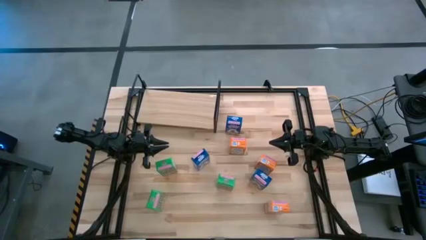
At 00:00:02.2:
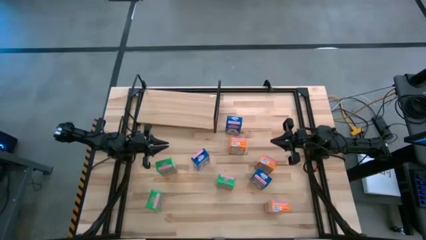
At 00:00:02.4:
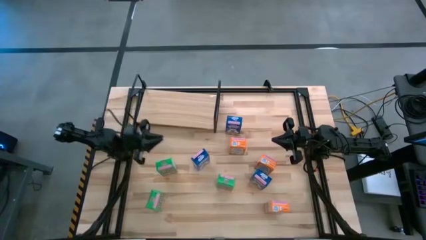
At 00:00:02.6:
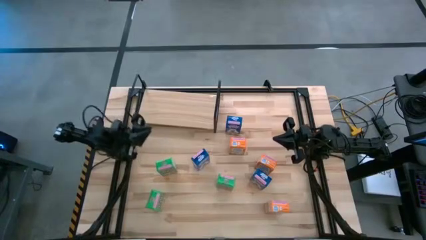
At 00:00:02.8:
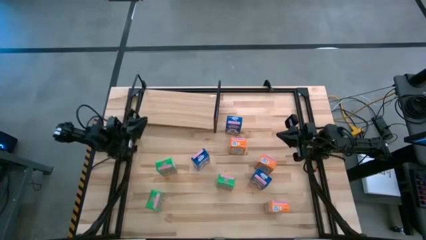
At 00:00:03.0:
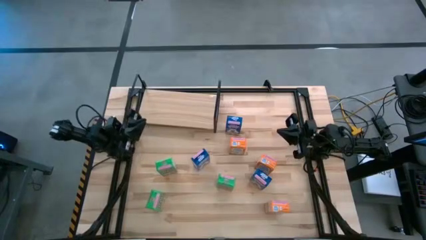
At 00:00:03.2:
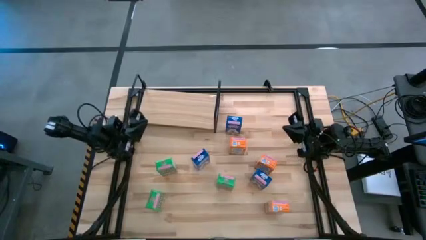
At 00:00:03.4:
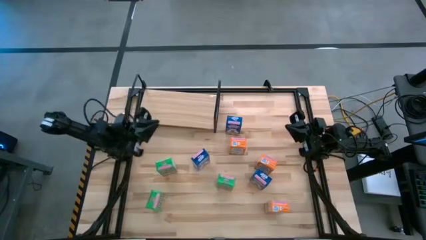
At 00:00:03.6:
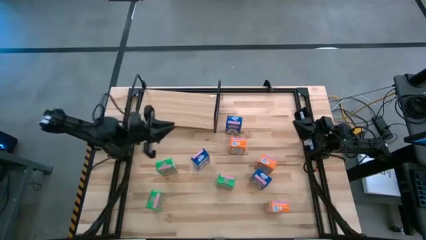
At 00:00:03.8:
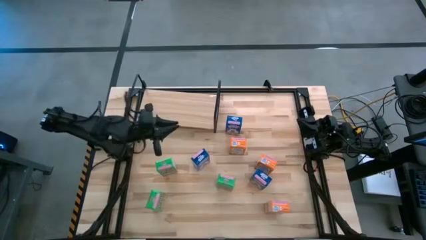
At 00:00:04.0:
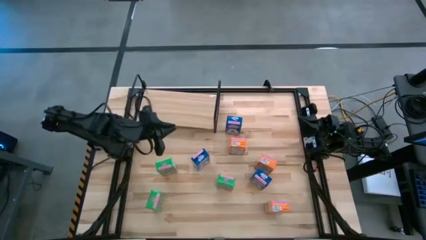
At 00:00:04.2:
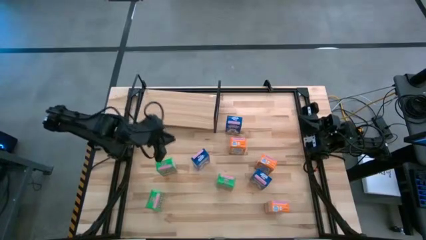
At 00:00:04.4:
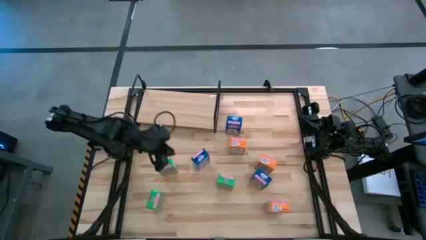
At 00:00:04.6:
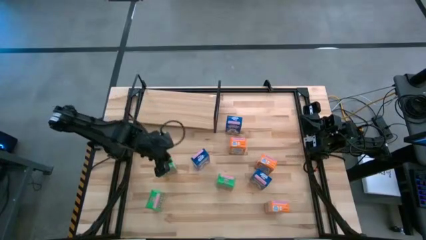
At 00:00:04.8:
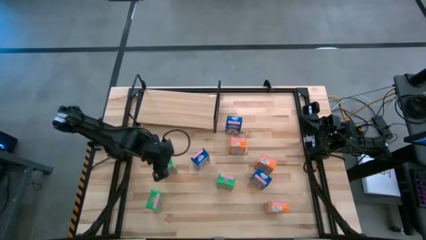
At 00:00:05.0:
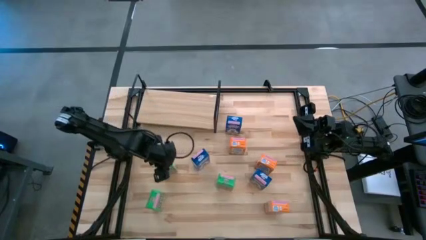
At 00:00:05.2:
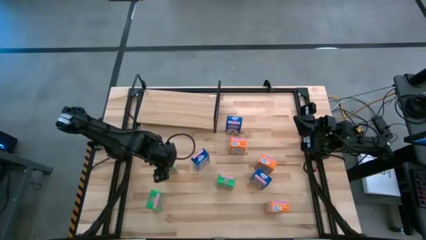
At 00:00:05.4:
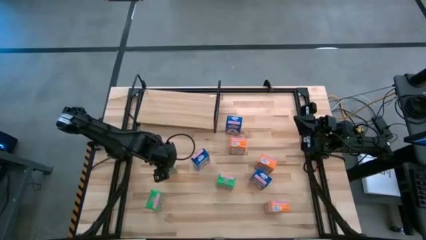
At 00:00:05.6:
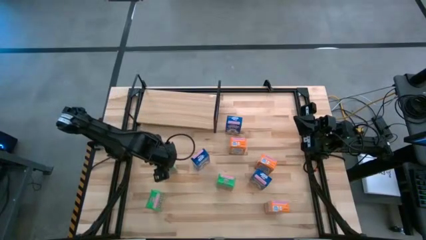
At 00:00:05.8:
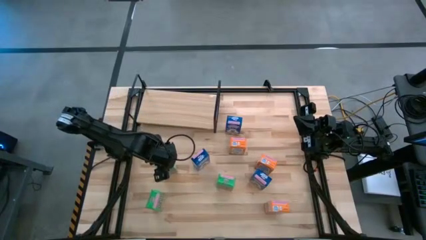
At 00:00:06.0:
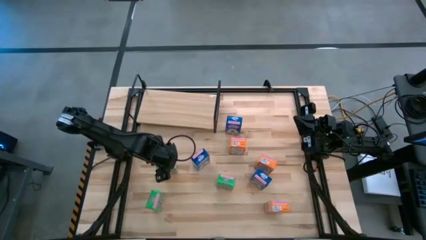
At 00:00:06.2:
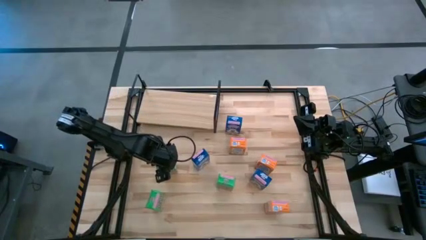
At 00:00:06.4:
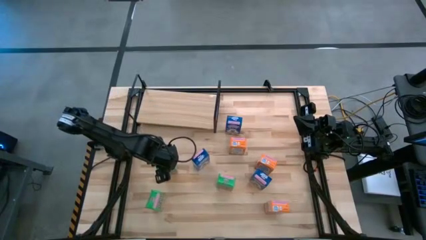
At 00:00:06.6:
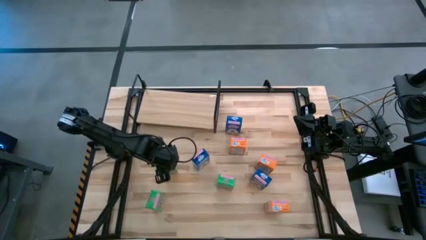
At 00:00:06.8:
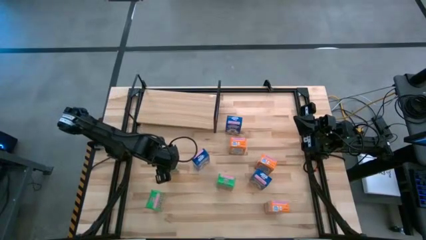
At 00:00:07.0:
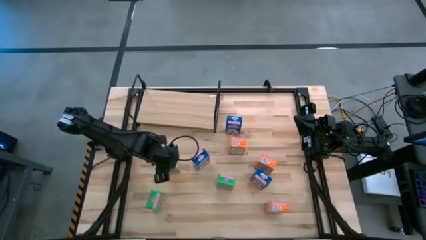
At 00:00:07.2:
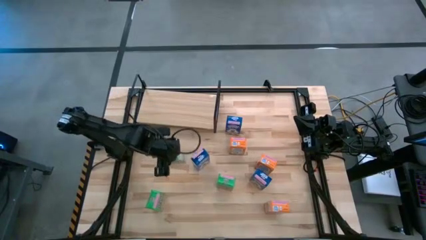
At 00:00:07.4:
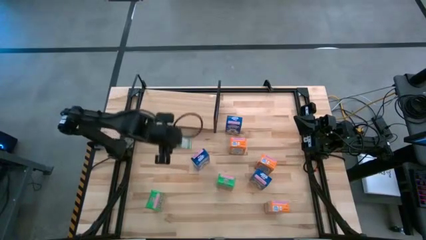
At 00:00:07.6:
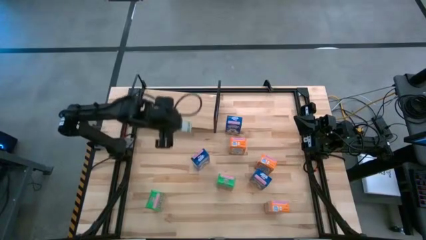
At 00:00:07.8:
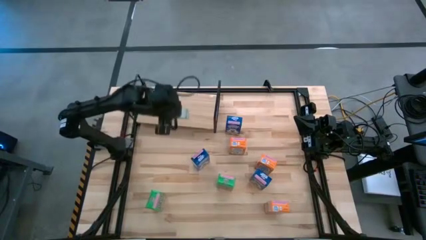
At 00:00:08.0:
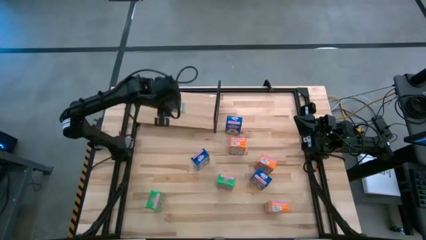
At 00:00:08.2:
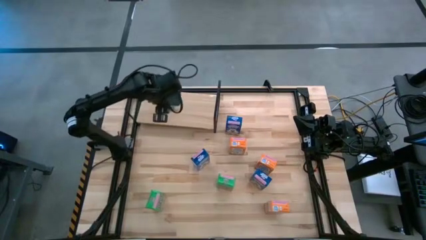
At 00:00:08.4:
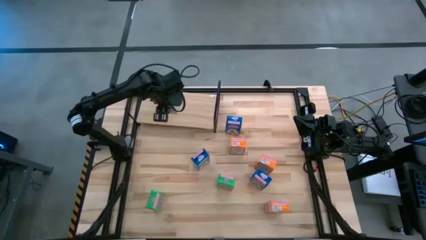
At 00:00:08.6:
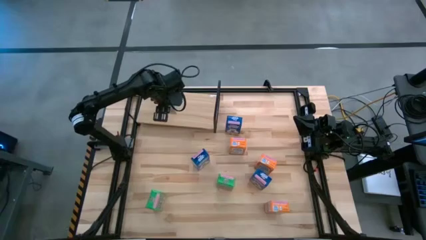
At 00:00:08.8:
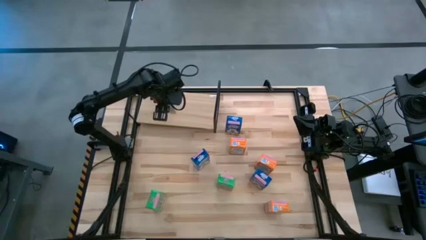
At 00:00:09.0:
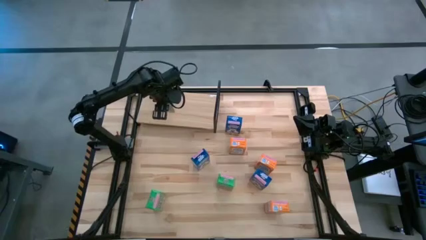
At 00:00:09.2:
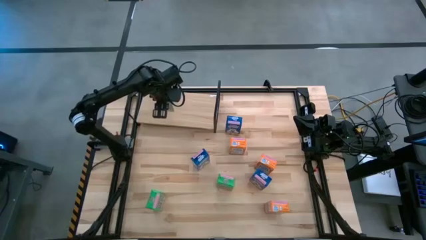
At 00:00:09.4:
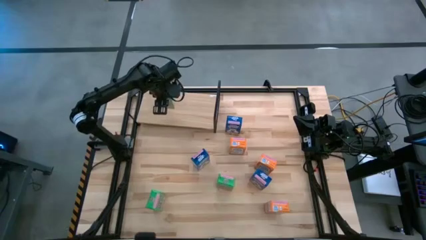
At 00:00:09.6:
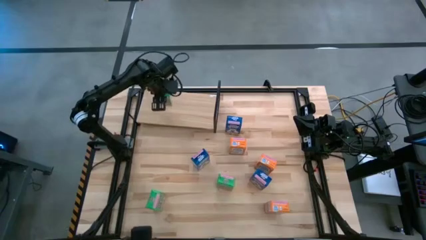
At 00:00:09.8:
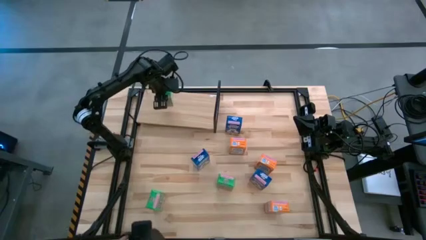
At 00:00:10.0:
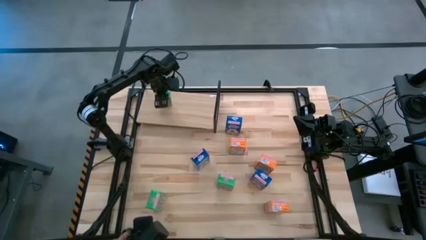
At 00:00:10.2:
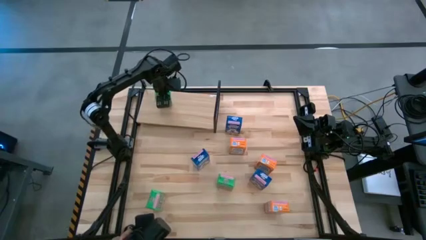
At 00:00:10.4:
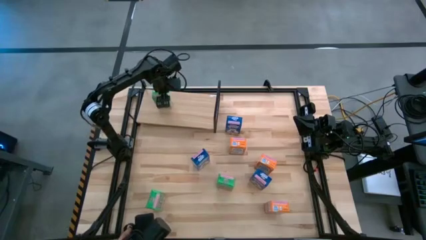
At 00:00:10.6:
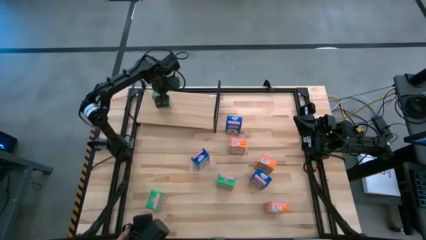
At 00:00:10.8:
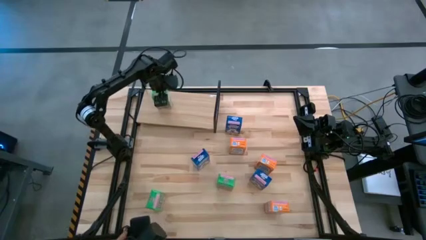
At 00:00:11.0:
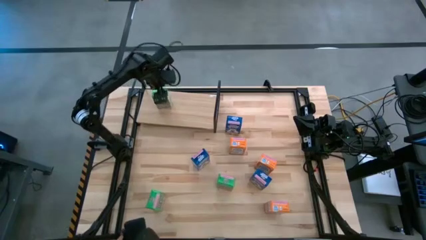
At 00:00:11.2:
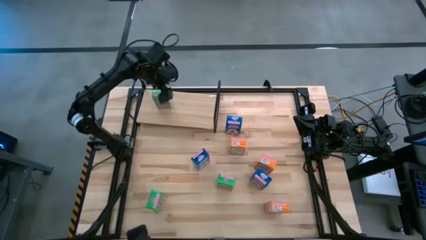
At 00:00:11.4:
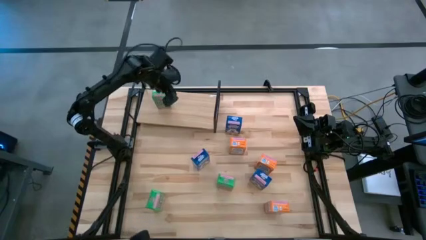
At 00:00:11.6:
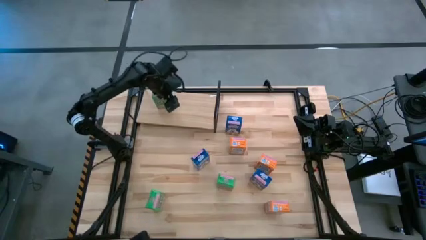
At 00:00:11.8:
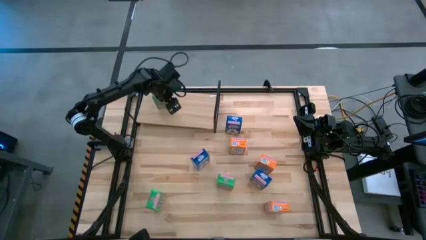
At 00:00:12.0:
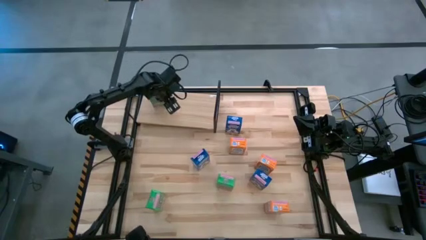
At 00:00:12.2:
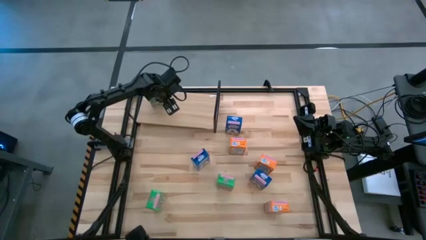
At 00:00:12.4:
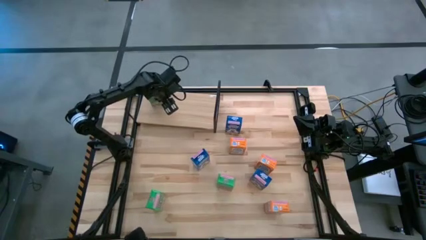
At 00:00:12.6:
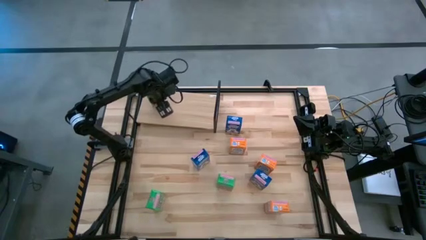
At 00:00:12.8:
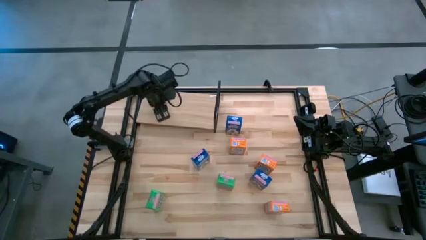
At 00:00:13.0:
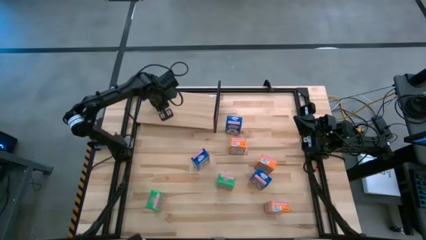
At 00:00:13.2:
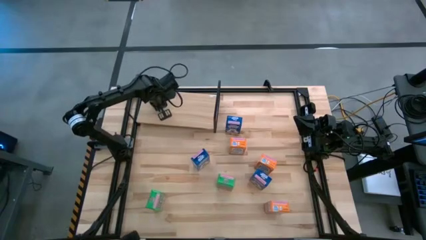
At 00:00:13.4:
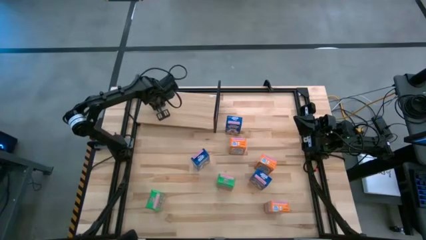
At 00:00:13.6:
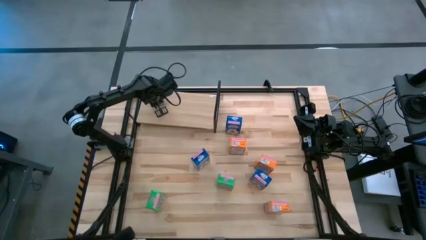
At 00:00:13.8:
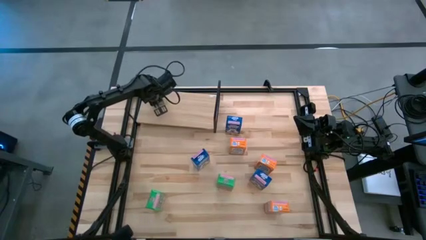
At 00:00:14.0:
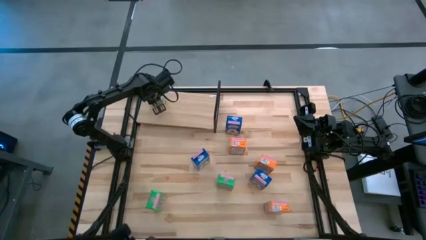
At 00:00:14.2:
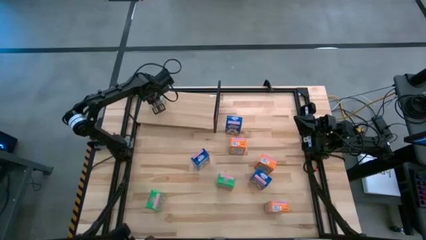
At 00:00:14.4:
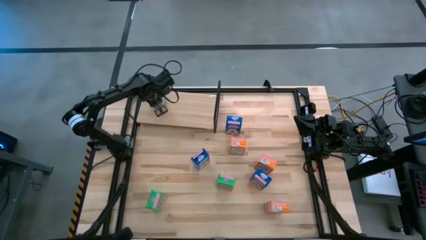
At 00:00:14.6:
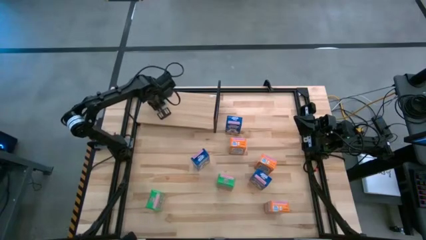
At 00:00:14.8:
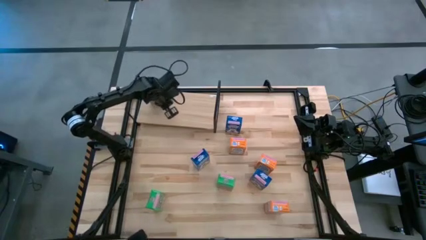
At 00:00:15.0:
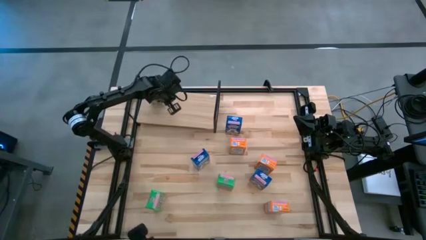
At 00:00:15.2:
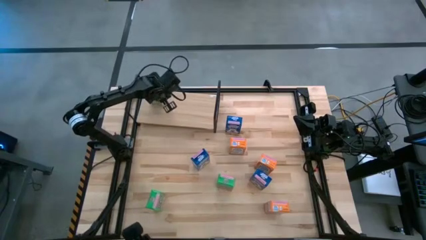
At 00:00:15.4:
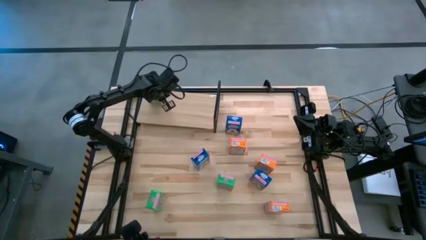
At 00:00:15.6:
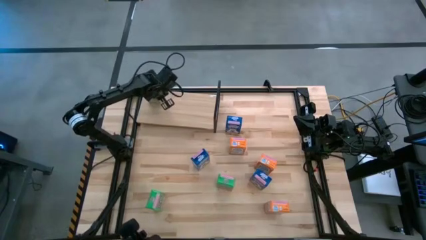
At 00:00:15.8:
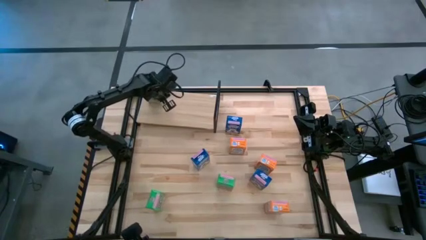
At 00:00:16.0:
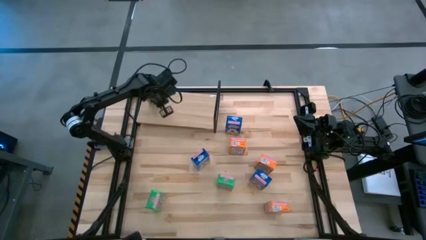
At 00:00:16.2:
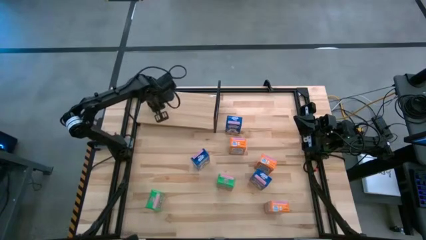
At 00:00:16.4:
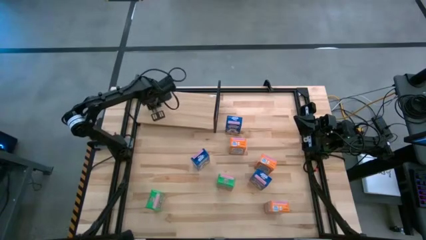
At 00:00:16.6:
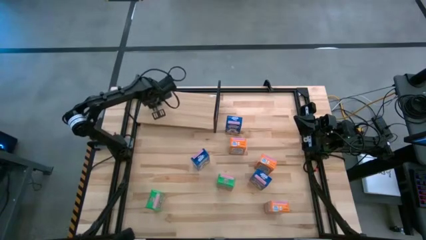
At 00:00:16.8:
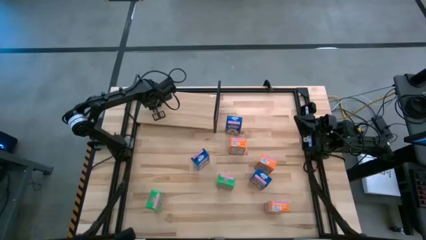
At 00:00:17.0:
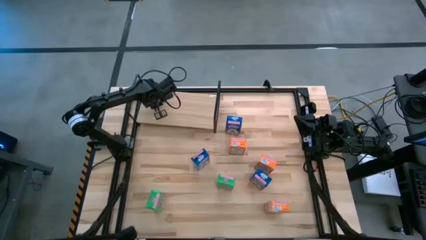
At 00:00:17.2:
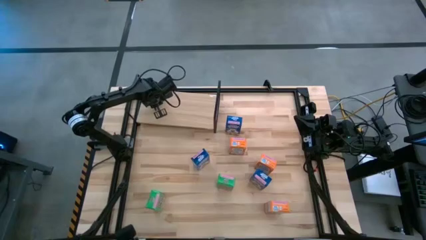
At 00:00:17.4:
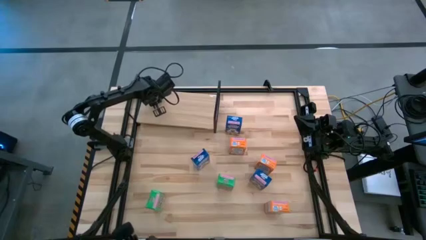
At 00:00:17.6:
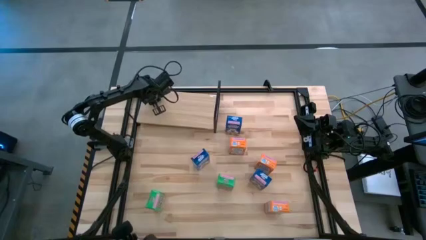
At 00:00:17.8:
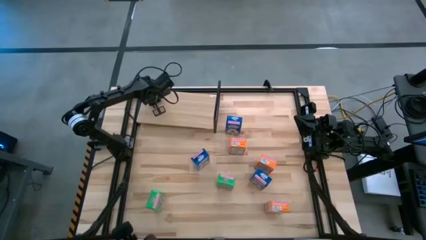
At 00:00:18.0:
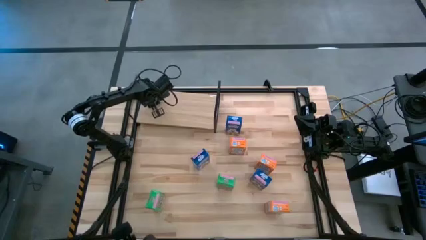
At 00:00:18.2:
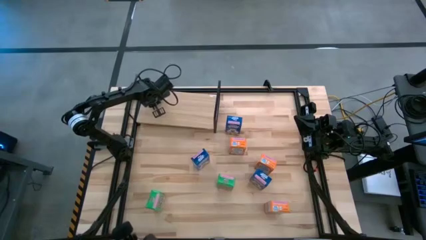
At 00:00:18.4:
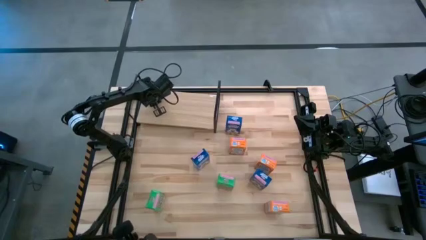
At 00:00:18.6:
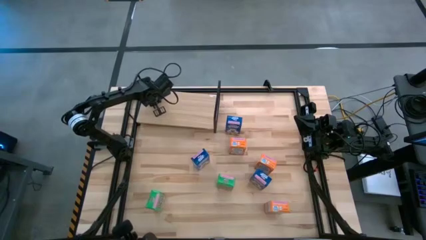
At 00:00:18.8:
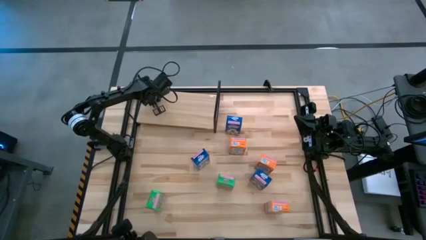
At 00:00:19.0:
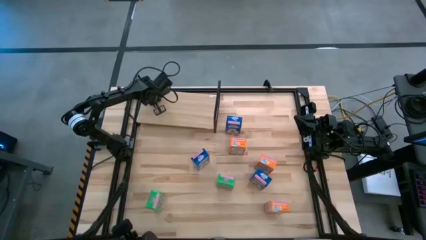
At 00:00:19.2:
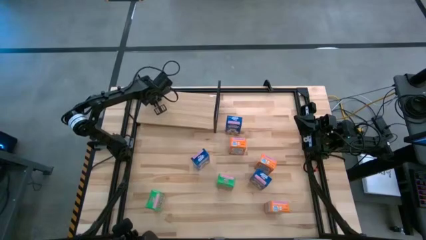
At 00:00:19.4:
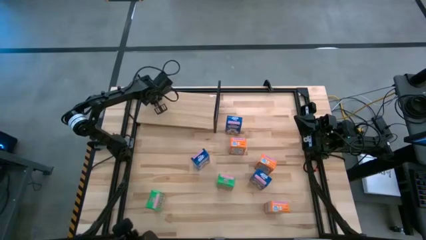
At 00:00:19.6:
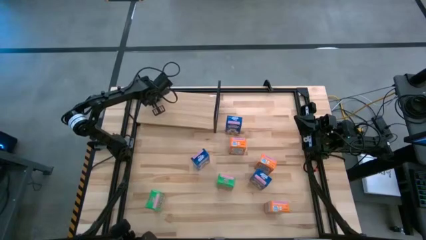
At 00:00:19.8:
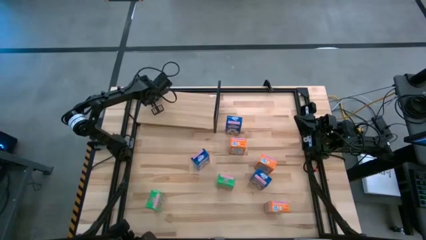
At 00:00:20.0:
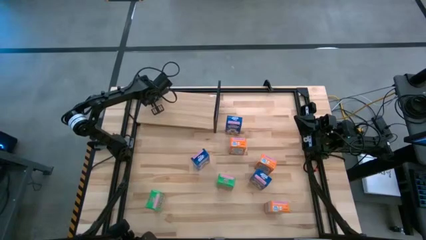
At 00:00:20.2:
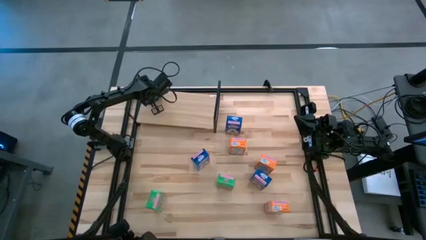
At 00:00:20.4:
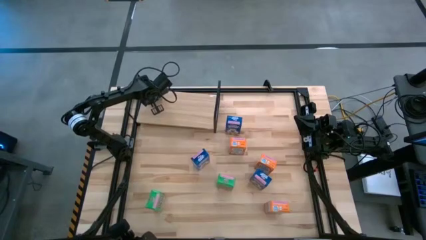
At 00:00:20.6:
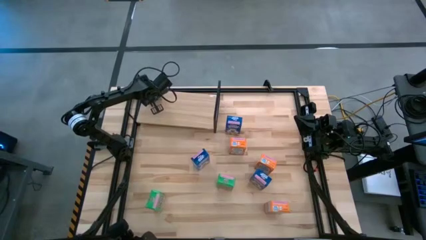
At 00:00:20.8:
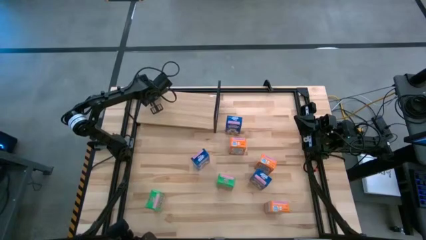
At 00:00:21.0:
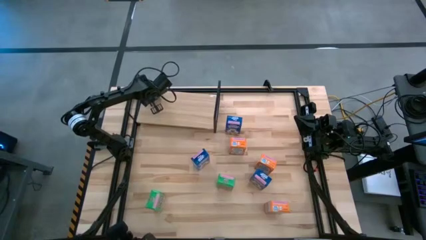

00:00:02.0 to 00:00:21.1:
Task: Stack cereal on shelf
Put the top left green cereal box on the shelf
